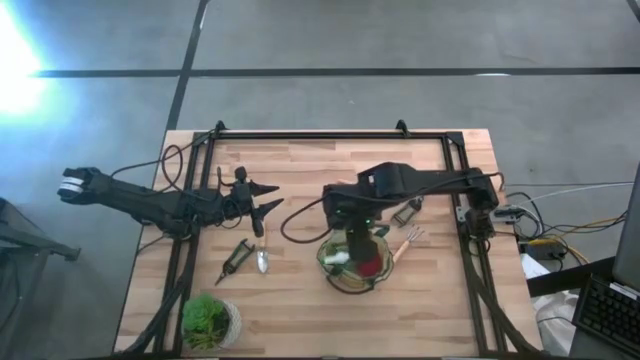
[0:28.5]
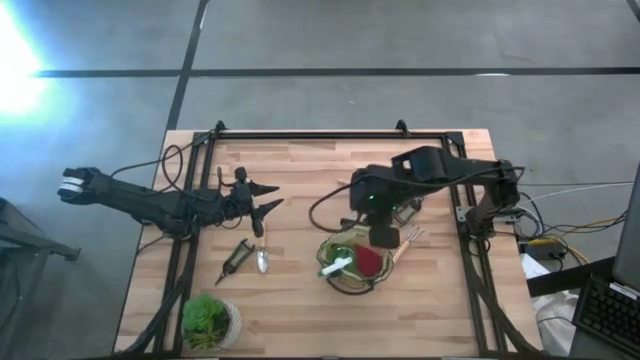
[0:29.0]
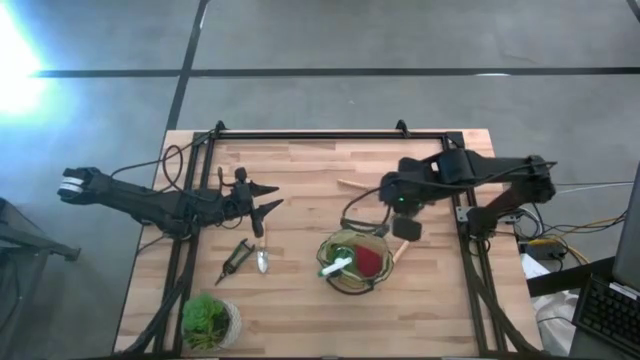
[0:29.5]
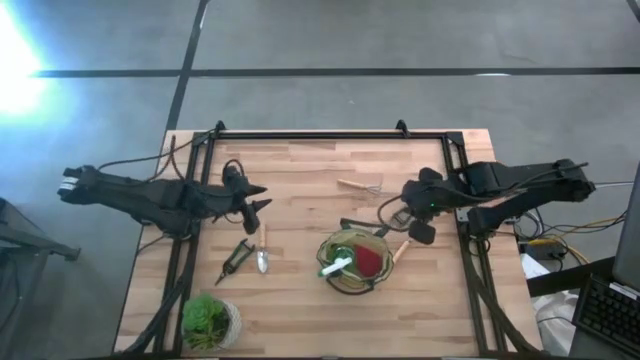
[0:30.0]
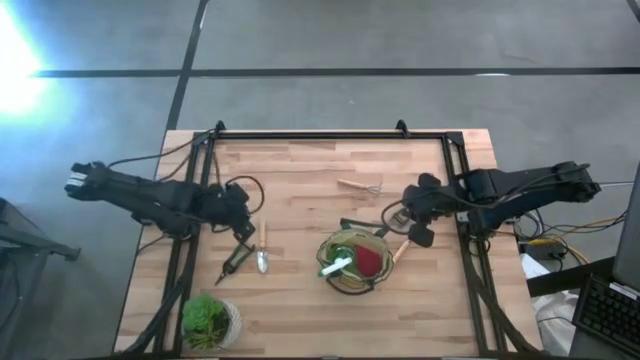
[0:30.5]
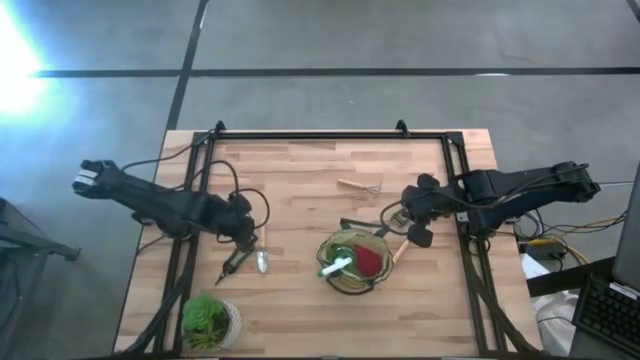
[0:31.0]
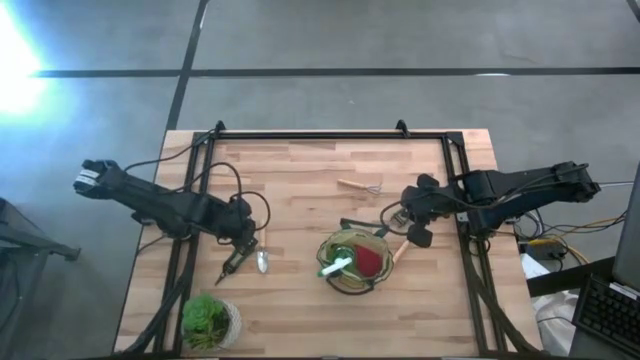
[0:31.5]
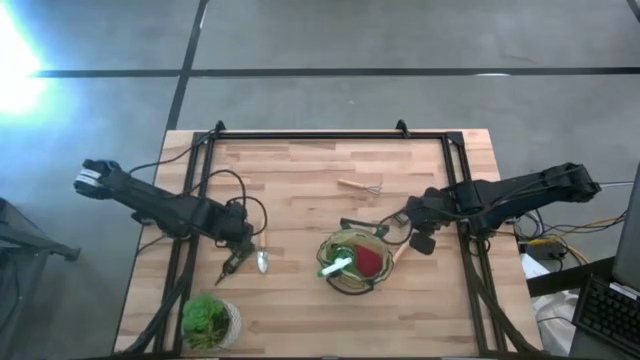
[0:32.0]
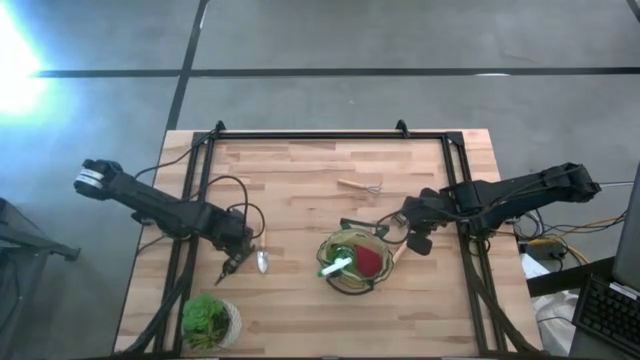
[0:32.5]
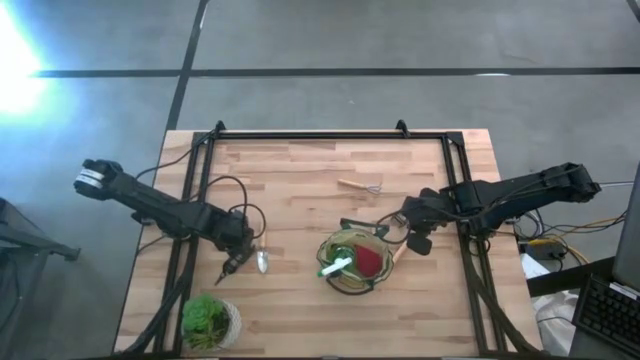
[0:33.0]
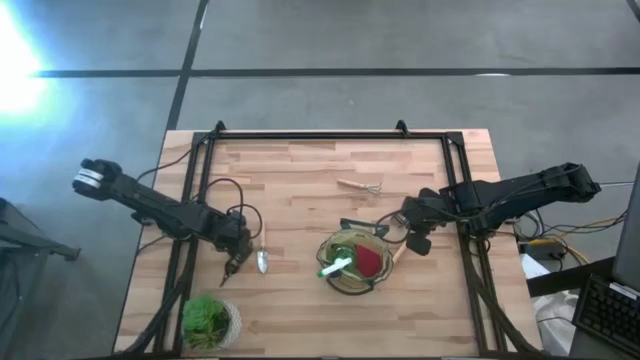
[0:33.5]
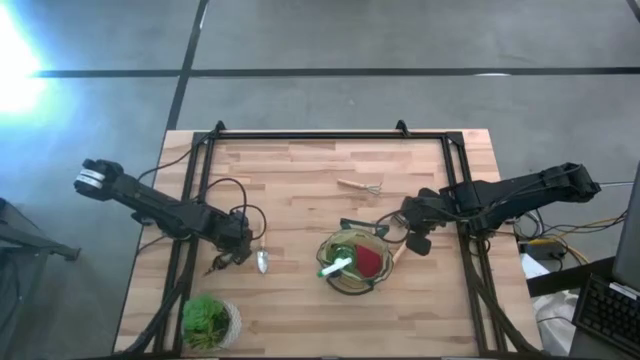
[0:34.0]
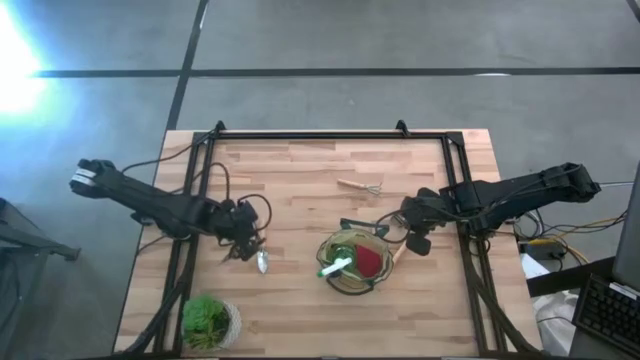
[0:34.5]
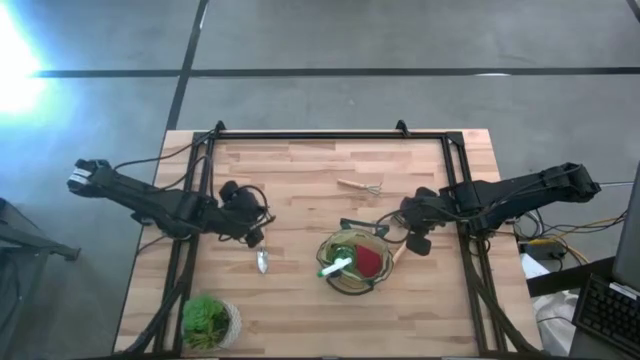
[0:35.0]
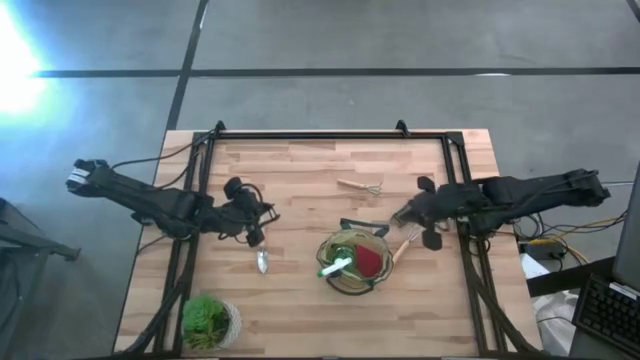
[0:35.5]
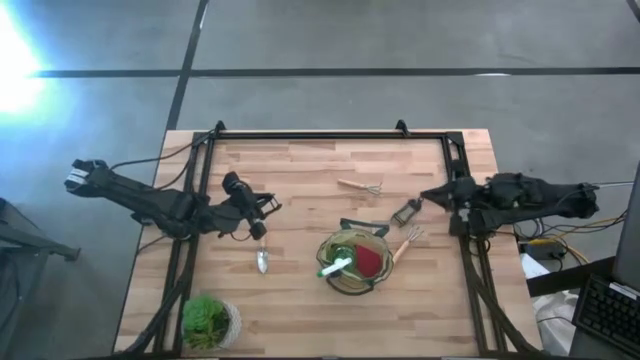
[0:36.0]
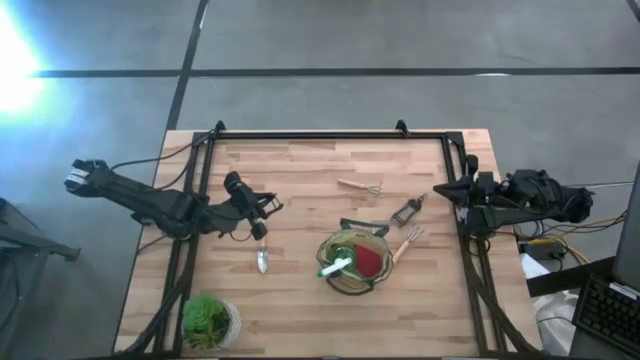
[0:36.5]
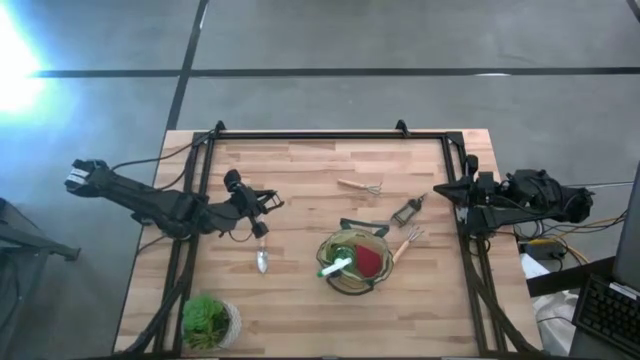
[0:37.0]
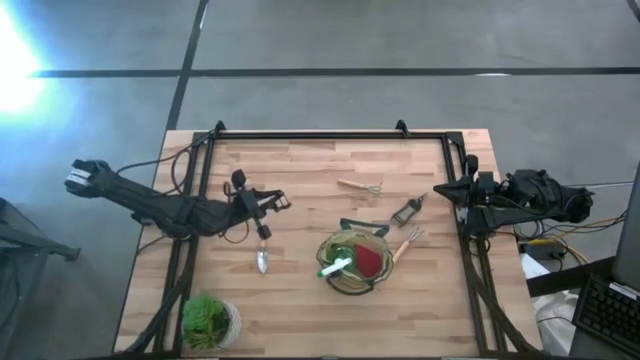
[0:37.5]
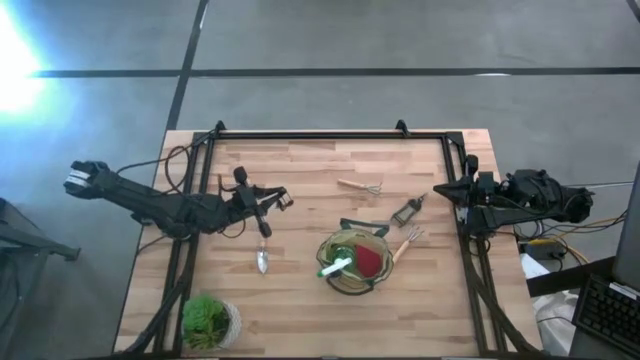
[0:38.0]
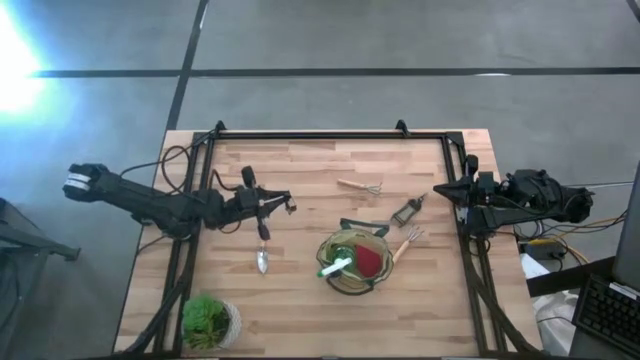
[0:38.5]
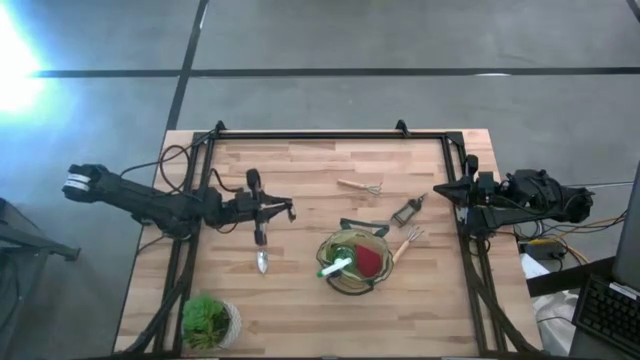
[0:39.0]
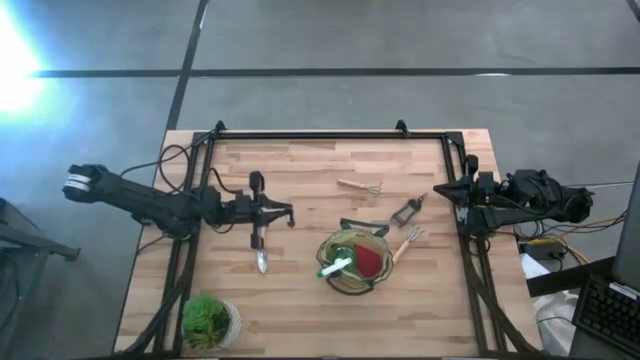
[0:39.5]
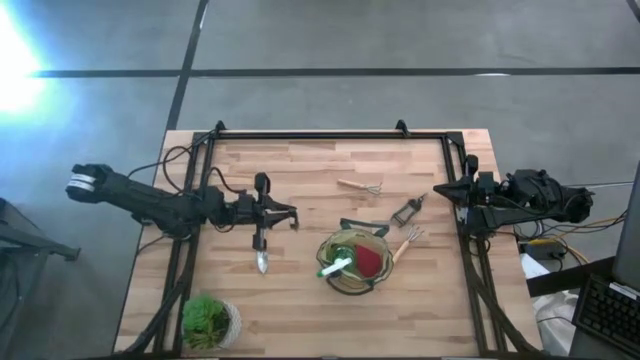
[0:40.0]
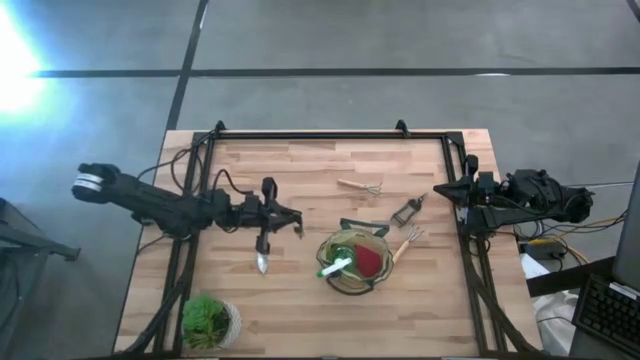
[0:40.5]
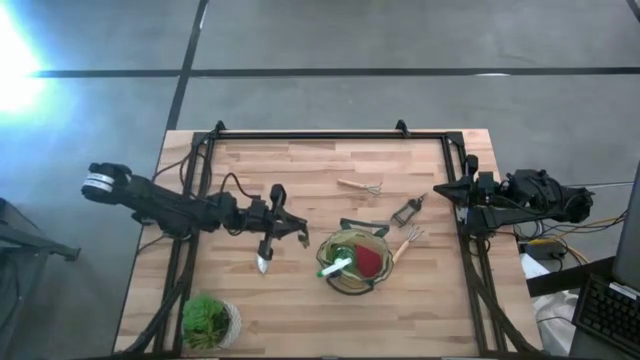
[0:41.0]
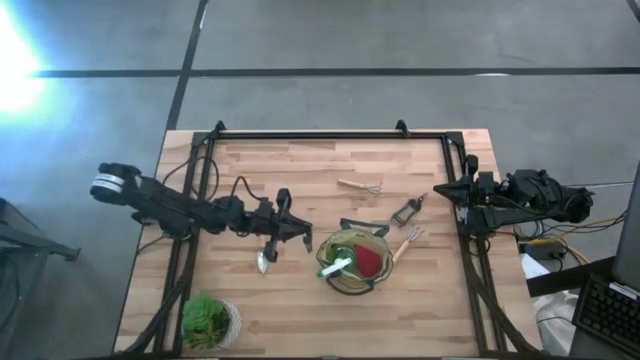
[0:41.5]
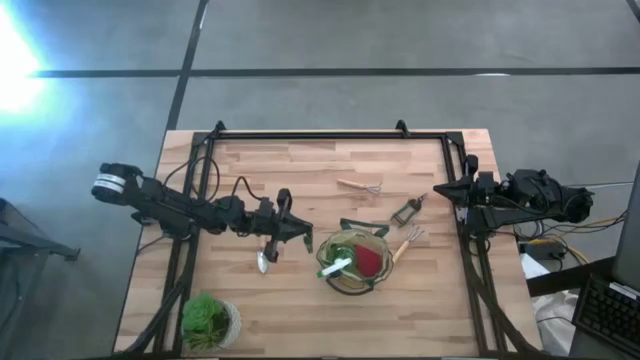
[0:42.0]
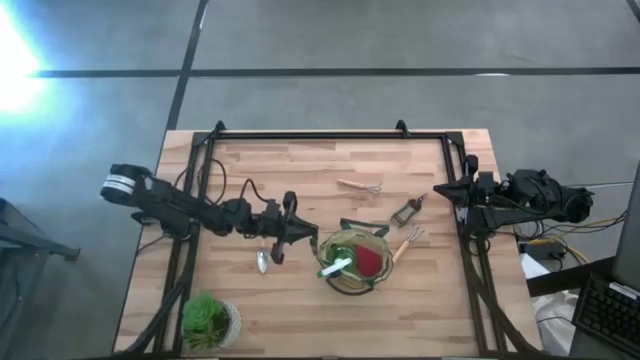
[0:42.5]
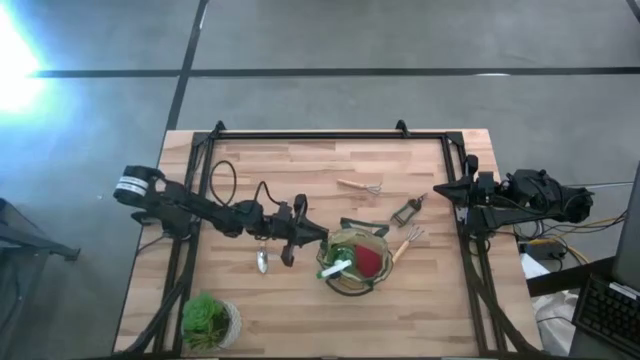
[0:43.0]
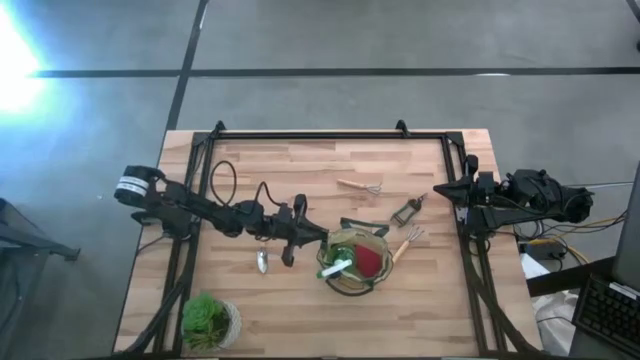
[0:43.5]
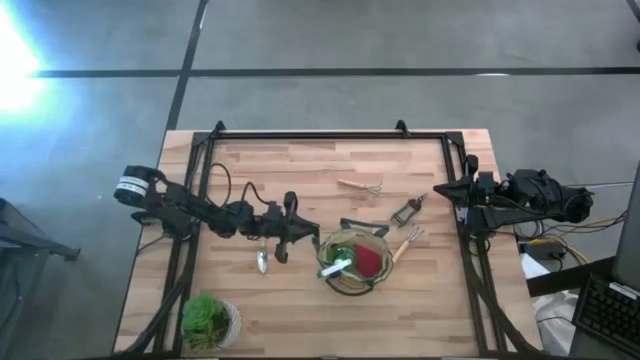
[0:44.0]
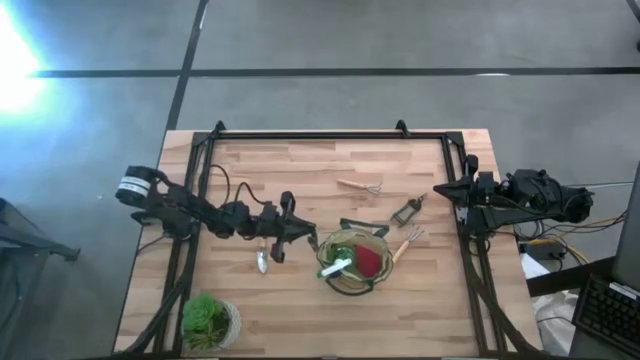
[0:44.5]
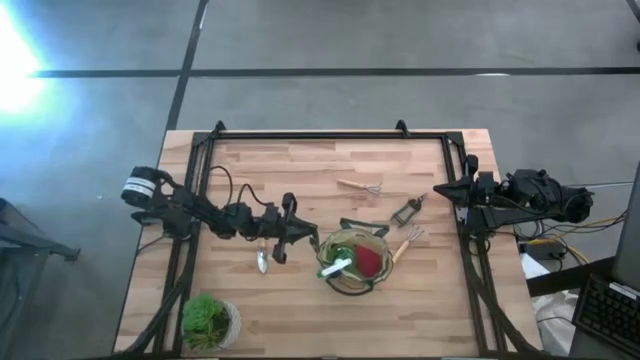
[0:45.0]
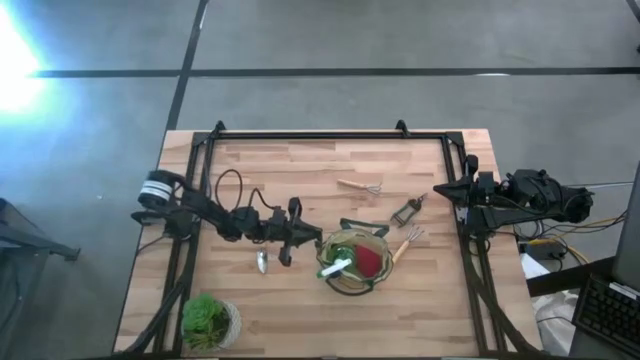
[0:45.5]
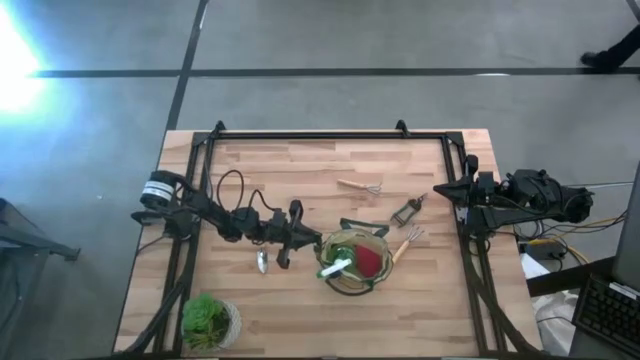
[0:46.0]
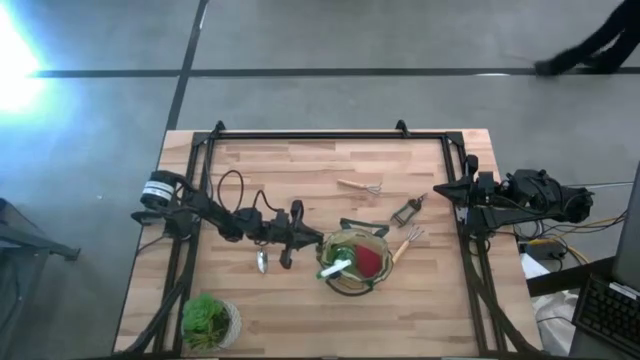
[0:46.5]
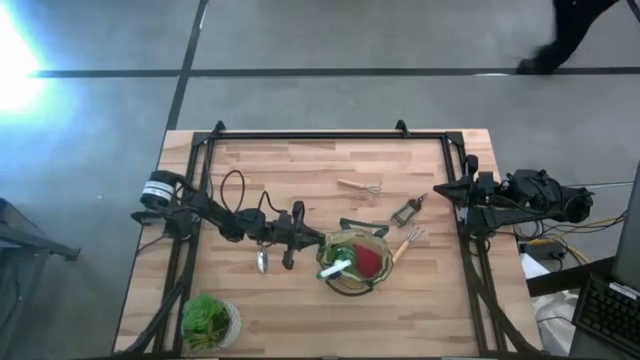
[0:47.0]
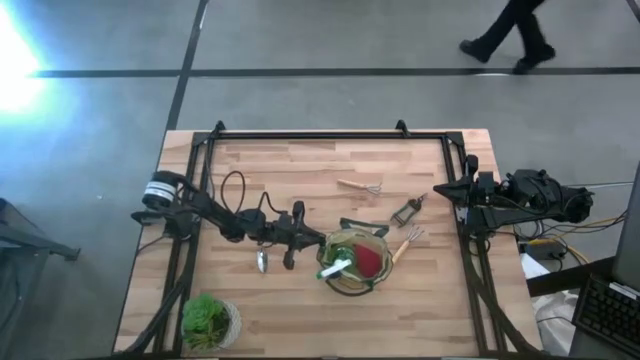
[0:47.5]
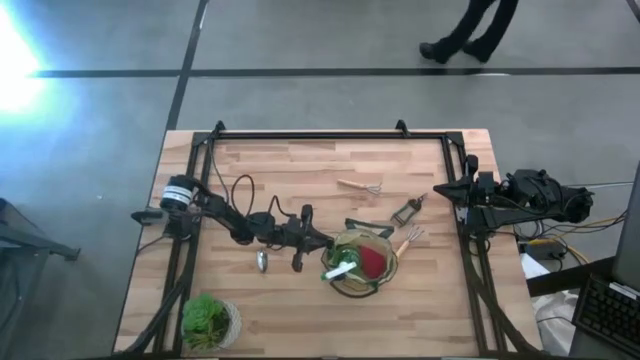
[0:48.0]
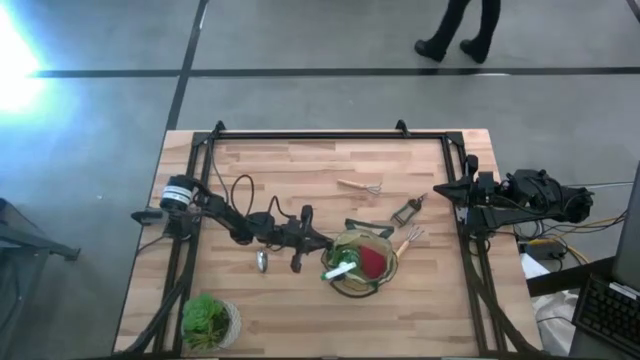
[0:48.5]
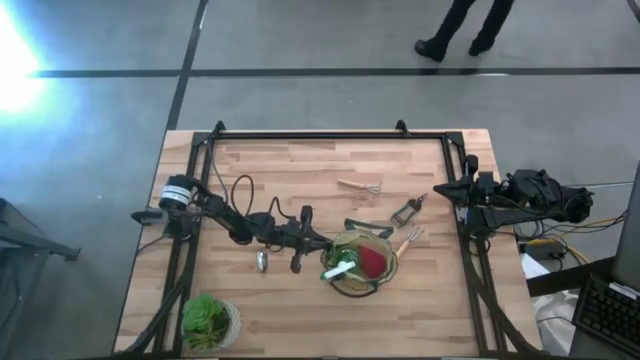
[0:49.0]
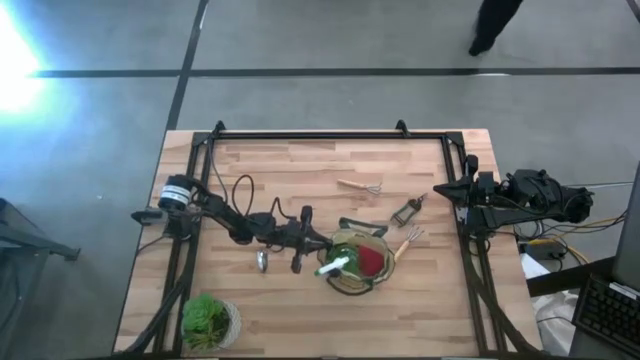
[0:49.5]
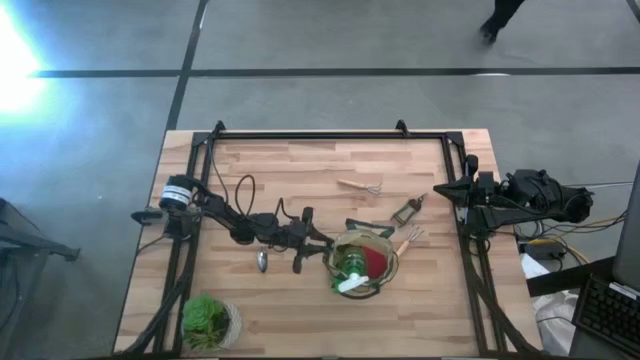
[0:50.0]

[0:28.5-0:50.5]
Task: Pick & Place Garden tools in Gardening bag
Put the left shear scissors into the side pocket of the gardening bag
